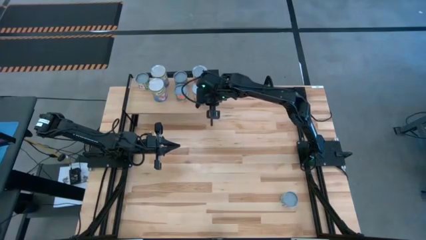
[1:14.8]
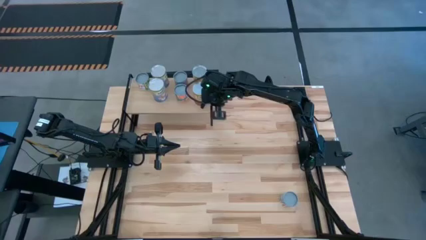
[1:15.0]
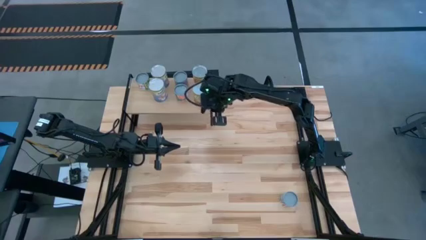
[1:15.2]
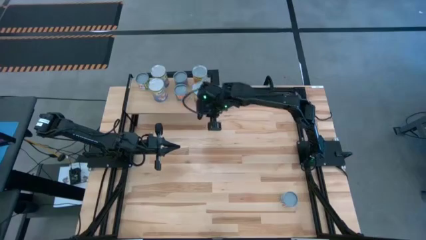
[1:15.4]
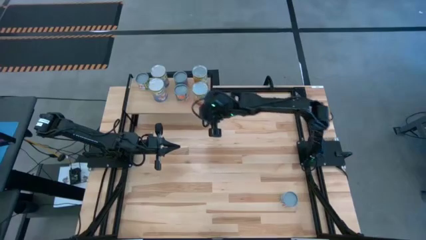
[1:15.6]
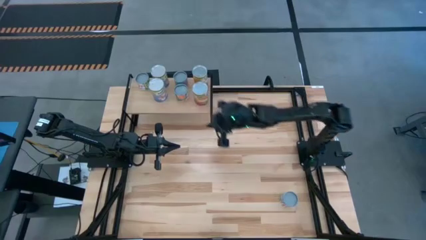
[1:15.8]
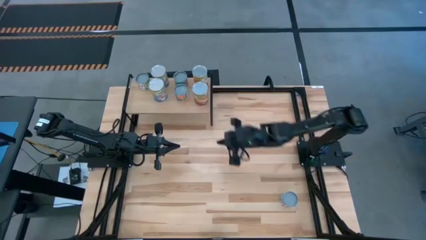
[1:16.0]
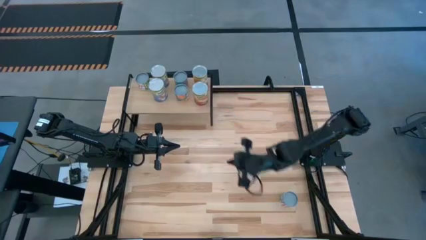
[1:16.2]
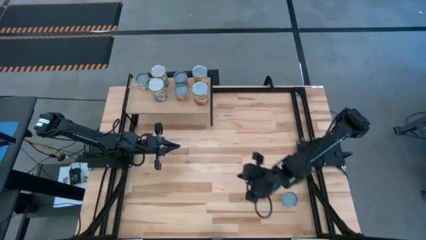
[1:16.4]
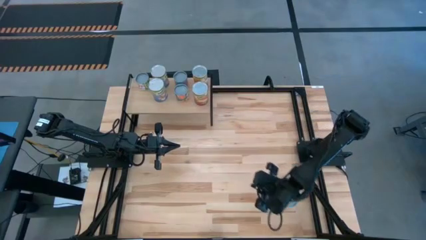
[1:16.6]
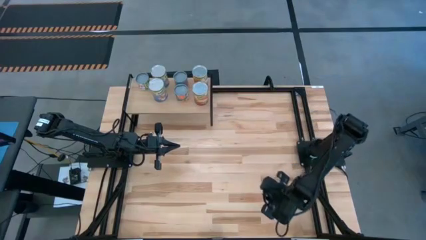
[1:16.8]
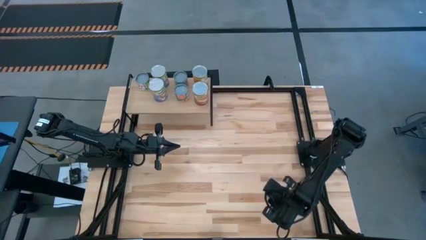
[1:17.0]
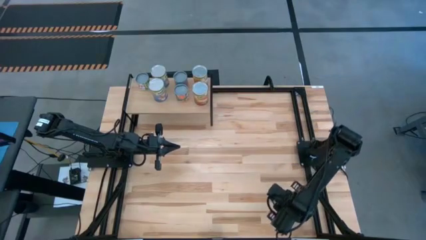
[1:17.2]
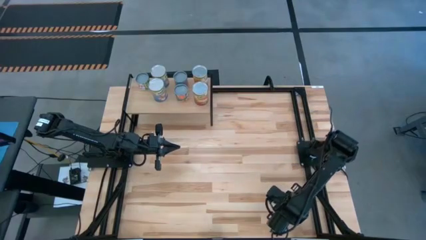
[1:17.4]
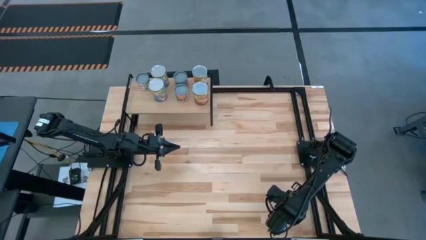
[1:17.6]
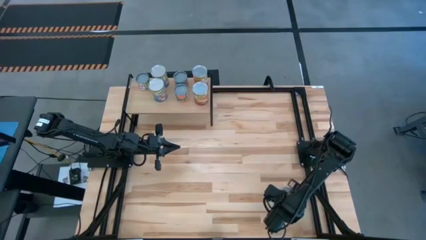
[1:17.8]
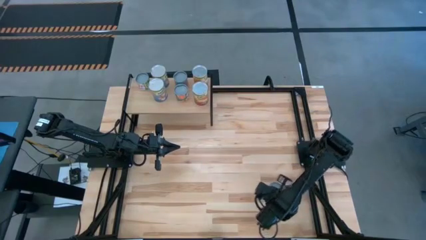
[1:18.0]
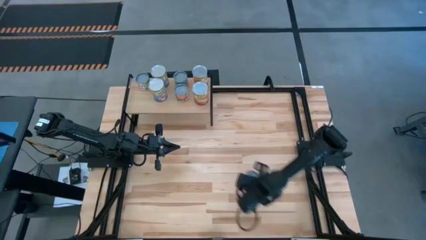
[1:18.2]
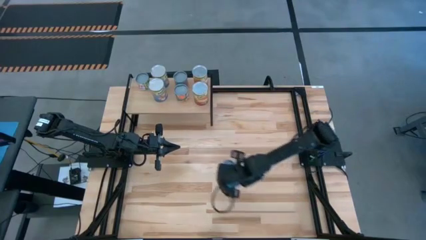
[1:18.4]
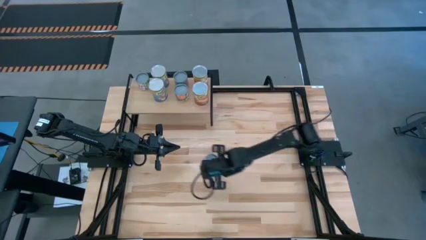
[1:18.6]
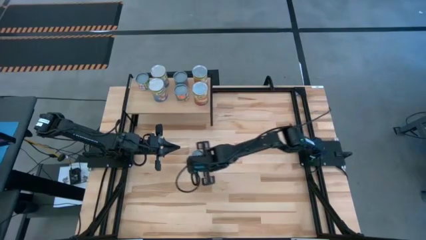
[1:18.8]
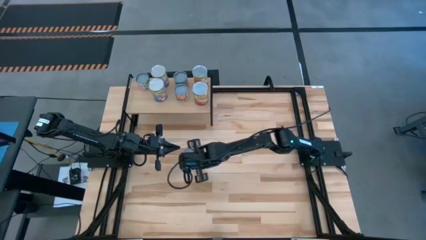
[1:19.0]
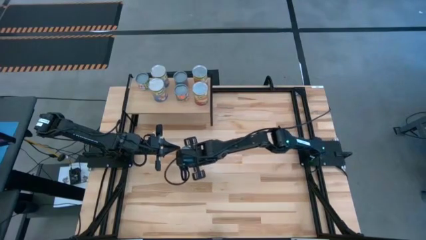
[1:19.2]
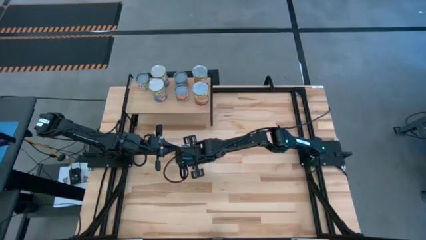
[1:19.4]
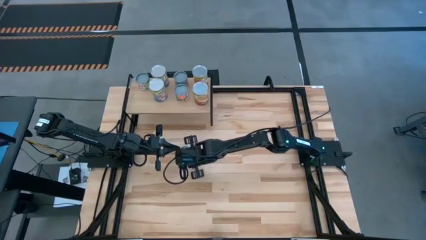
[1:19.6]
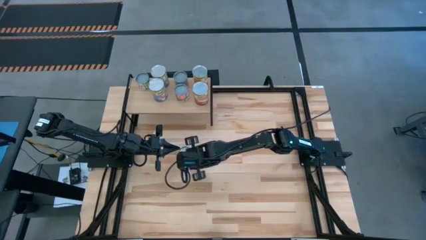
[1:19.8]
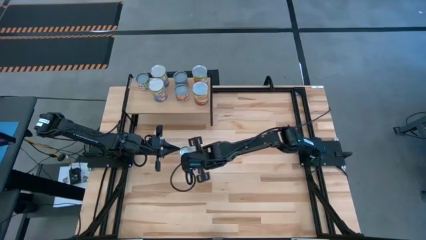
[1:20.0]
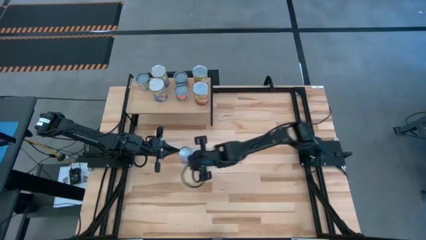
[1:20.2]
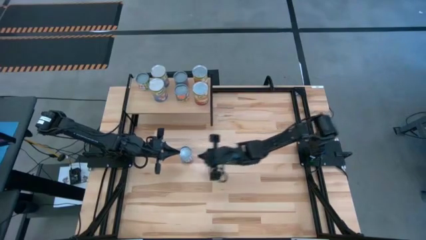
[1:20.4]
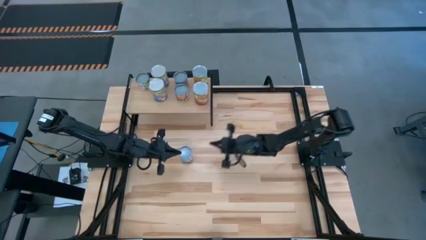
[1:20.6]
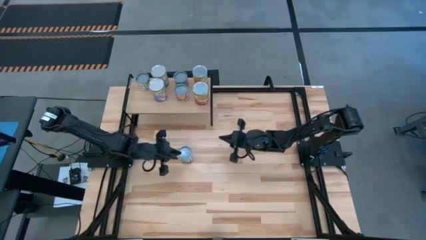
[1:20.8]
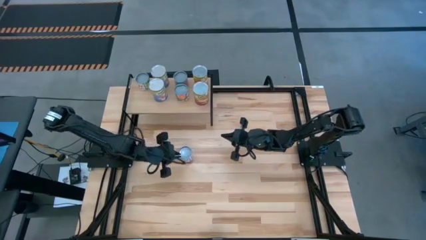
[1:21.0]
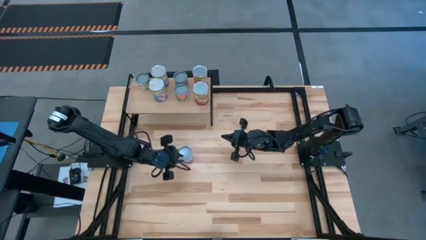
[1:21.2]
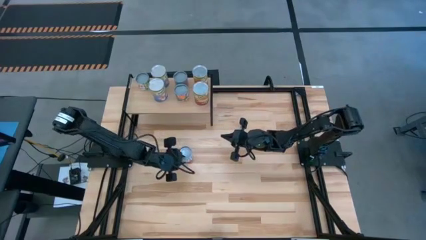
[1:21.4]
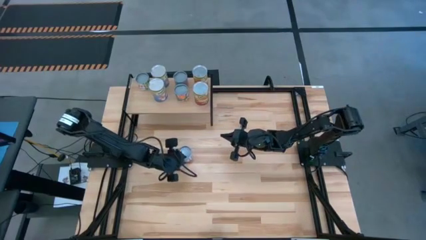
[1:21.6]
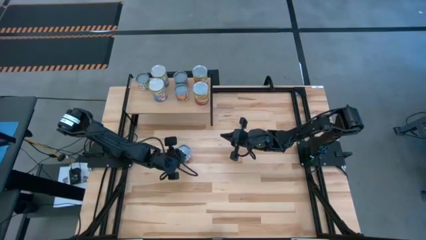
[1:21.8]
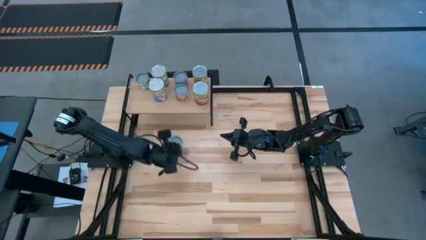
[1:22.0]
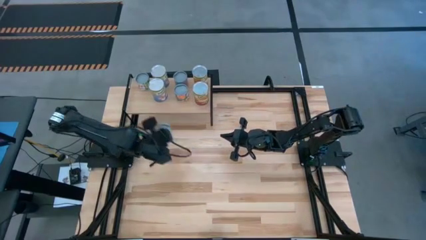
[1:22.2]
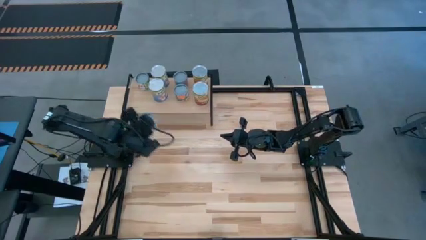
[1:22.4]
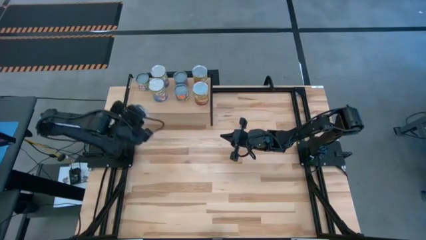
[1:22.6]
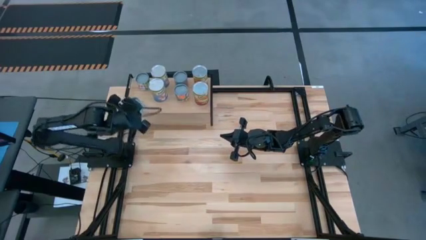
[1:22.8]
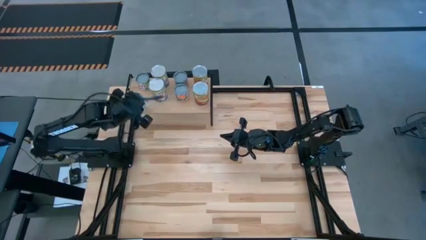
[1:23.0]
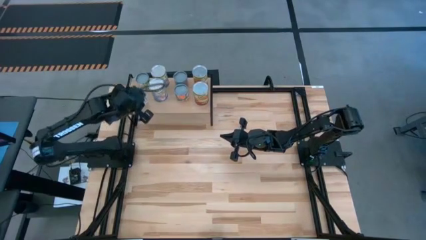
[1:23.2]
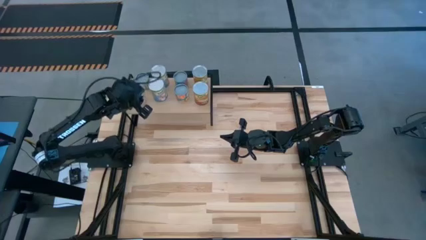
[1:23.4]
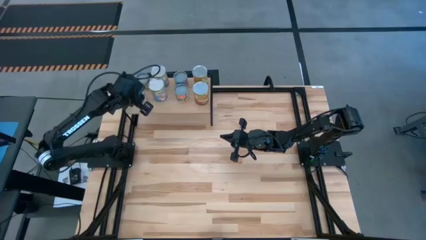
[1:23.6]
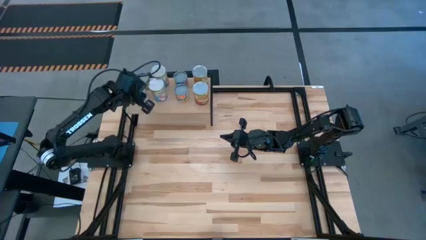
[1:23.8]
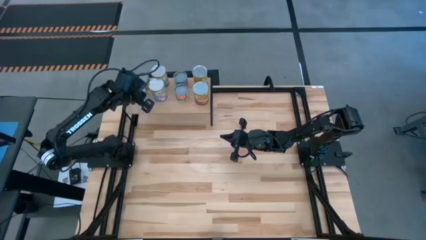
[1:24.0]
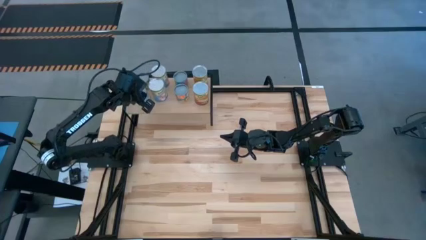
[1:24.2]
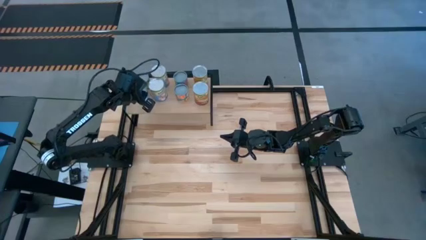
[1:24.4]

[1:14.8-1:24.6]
Task: Pick and place cans onto a shelf
Put the white can on the shelf aligned with the other light green

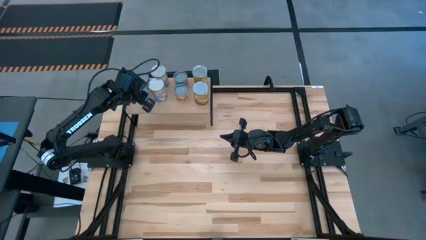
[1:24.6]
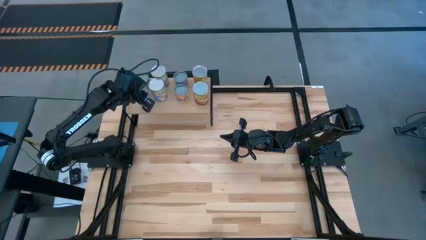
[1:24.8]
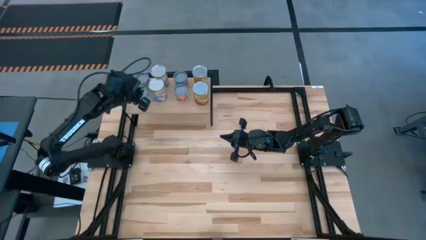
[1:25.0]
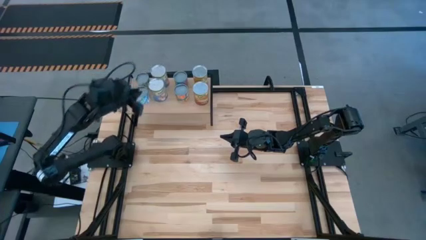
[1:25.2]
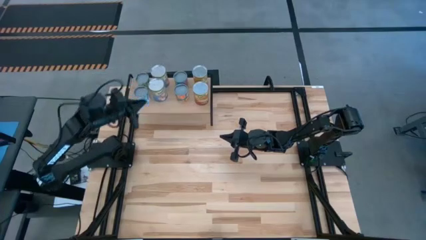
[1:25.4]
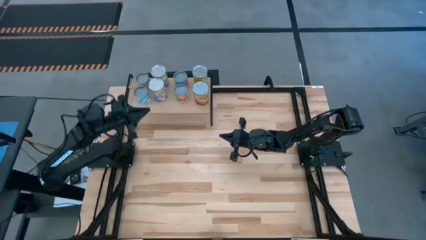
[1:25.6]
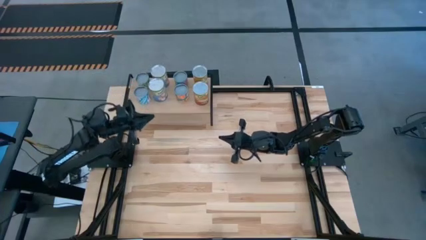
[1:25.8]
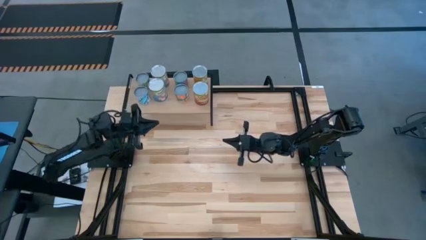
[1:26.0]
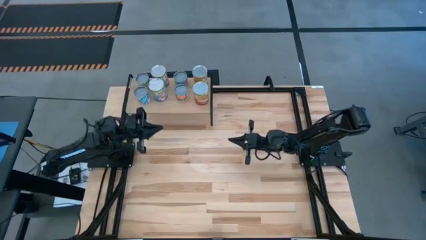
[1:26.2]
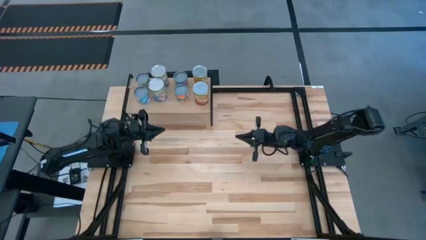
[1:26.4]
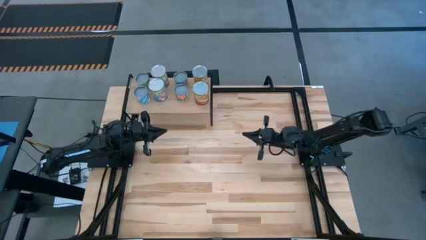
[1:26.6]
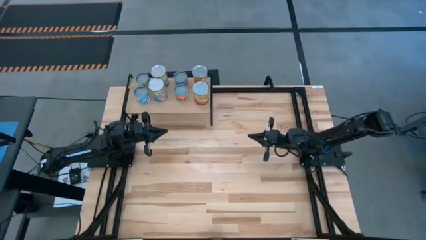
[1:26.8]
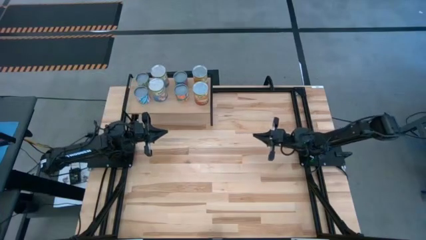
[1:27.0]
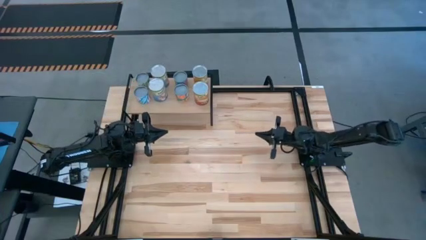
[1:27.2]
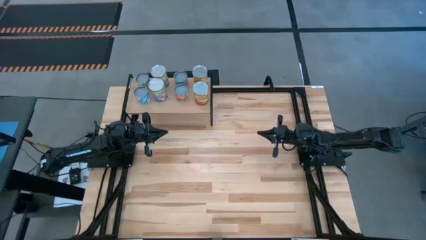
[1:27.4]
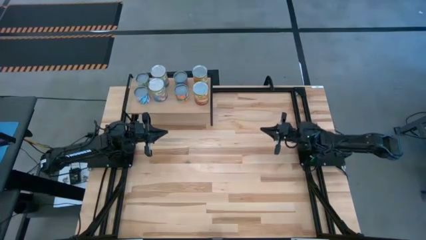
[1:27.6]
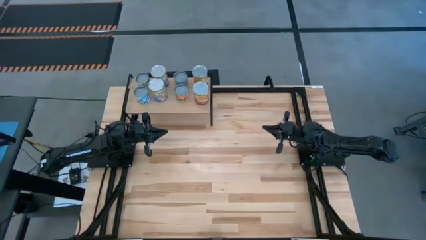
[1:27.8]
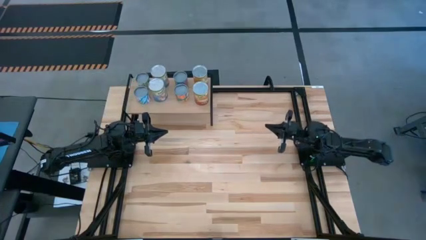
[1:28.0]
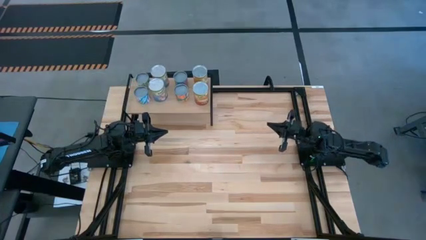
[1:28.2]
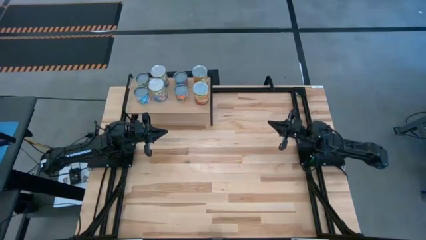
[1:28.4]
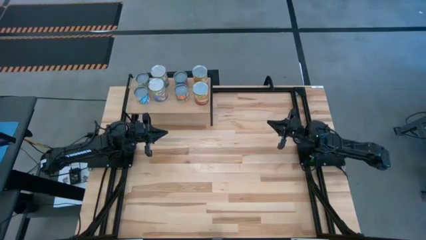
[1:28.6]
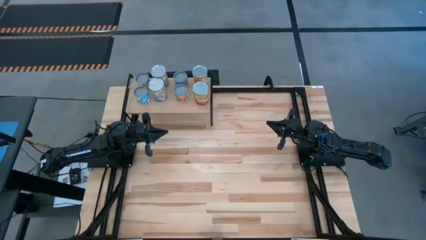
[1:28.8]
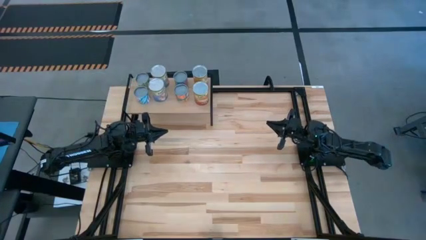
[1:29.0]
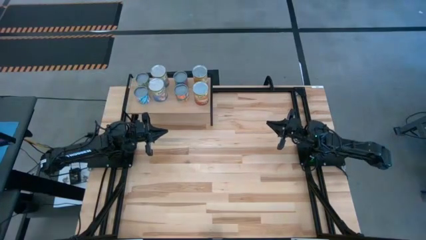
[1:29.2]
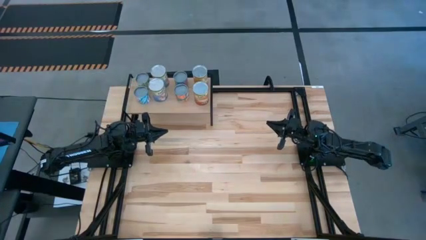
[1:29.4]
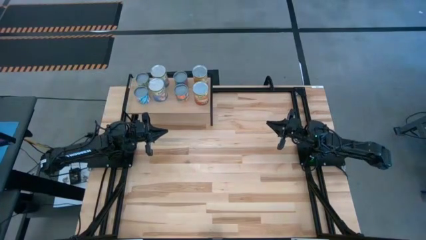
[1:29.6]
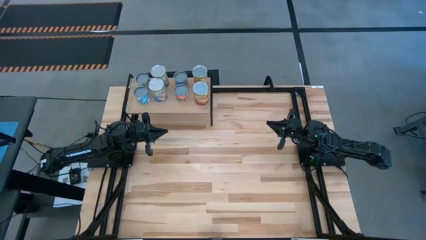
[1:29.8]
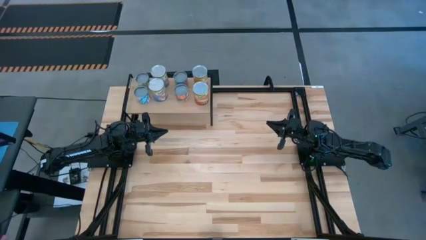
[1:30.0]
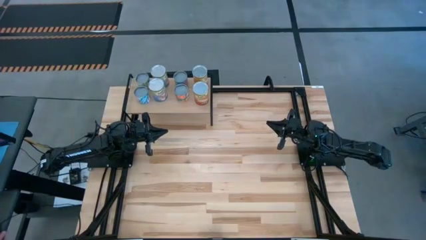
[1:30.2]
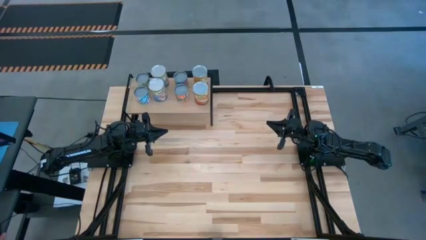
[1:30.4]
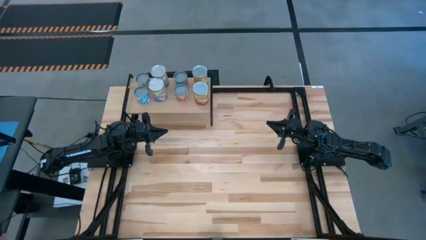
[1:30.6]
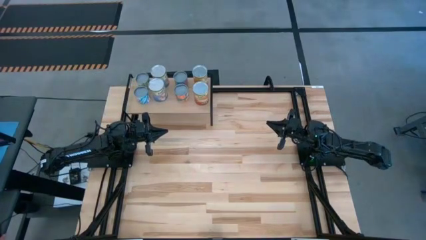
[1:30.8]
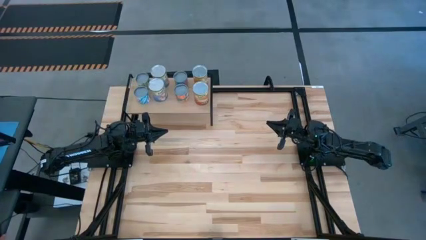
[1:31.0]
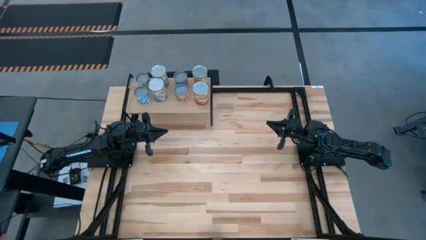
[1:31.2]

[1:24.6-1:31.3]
Return to Home Position
